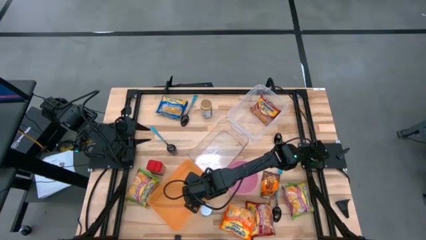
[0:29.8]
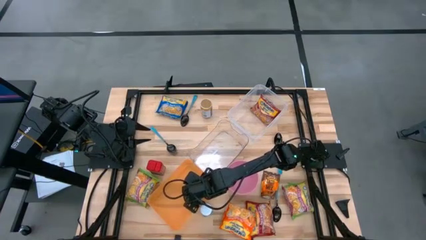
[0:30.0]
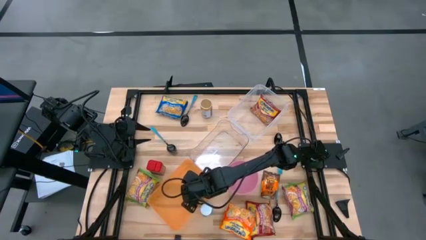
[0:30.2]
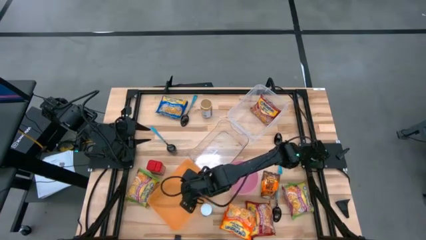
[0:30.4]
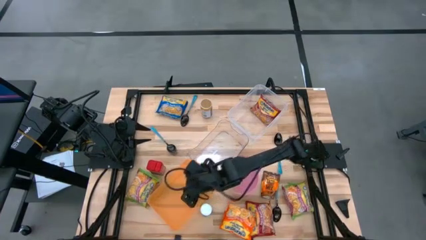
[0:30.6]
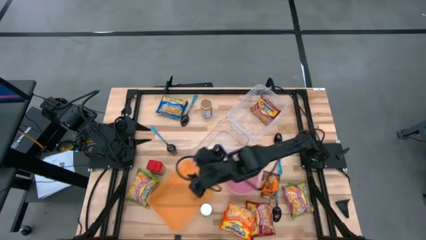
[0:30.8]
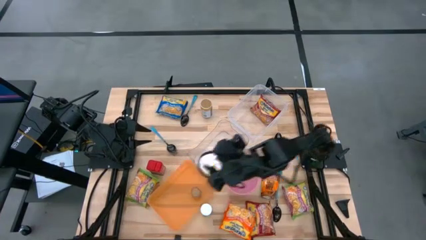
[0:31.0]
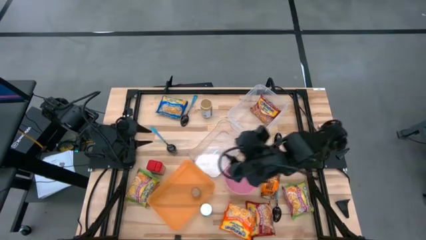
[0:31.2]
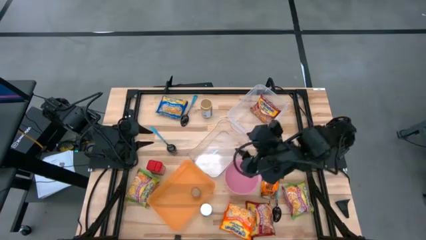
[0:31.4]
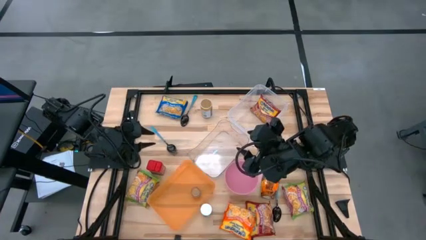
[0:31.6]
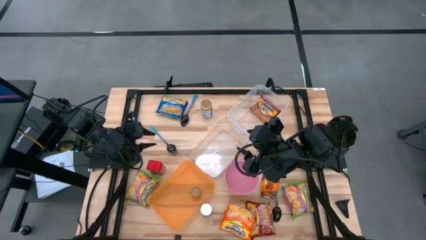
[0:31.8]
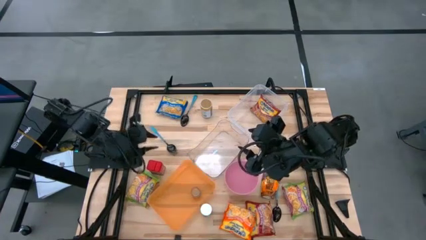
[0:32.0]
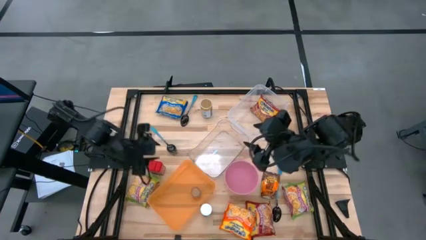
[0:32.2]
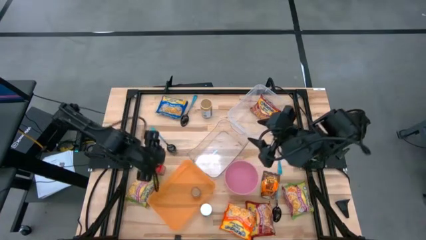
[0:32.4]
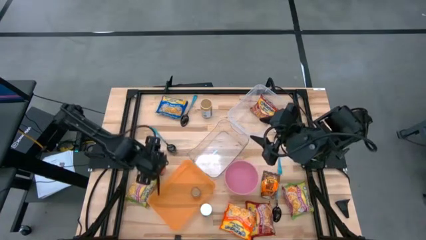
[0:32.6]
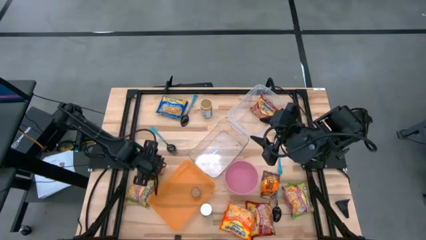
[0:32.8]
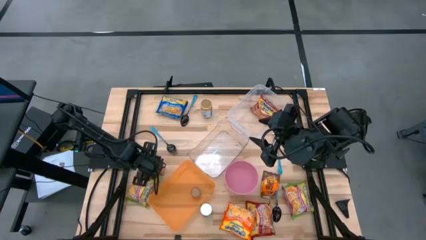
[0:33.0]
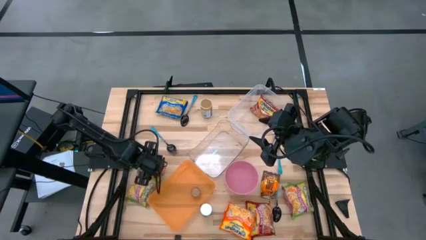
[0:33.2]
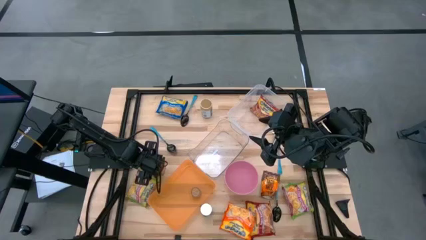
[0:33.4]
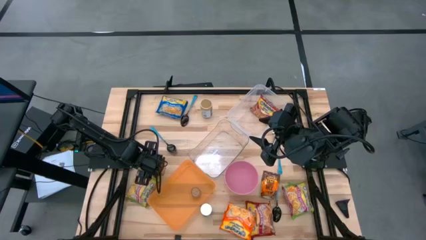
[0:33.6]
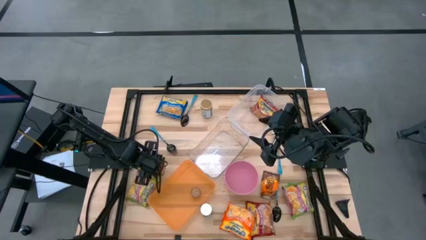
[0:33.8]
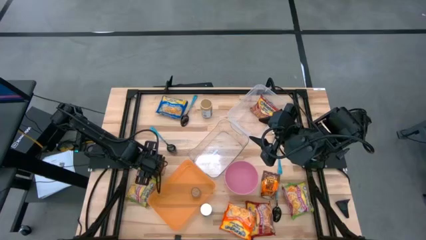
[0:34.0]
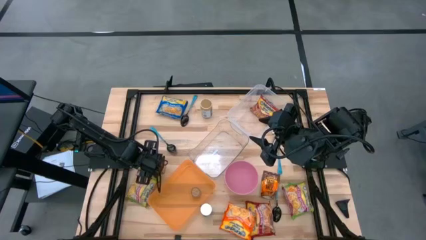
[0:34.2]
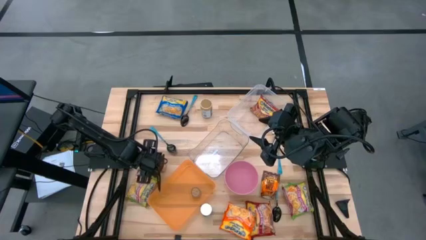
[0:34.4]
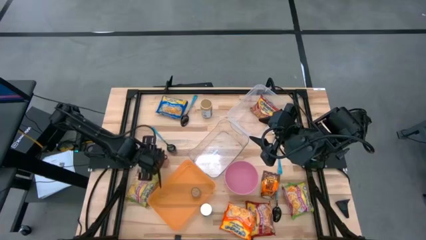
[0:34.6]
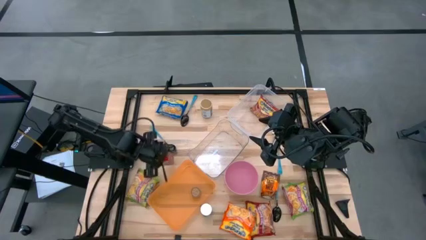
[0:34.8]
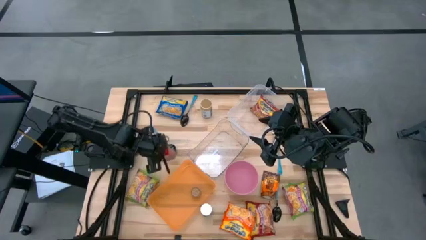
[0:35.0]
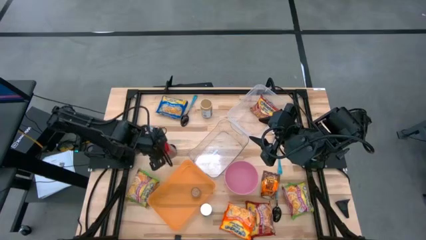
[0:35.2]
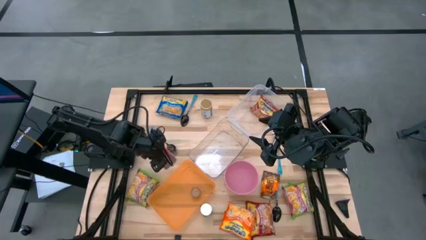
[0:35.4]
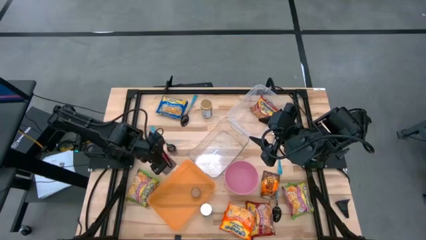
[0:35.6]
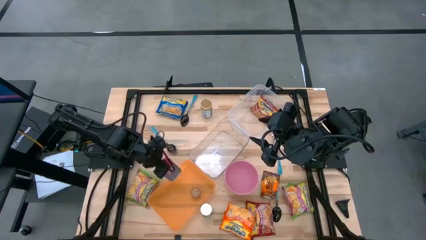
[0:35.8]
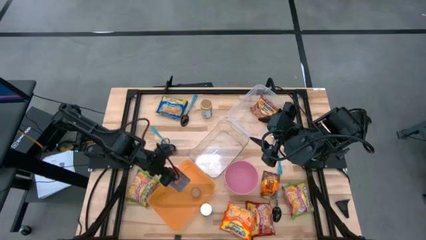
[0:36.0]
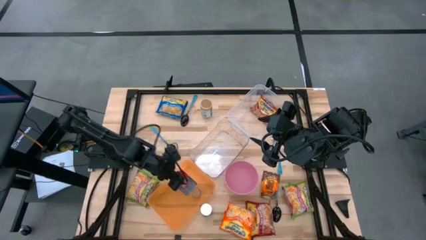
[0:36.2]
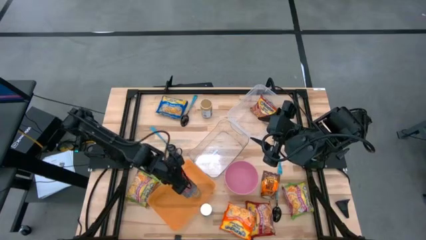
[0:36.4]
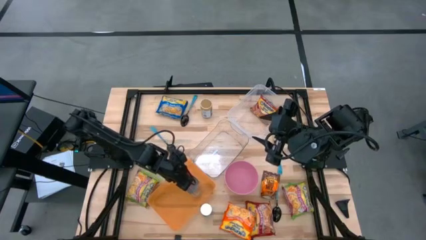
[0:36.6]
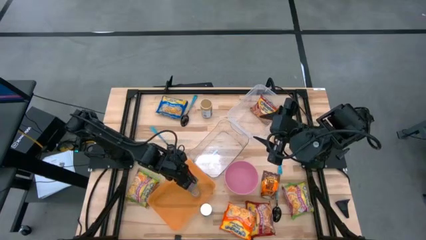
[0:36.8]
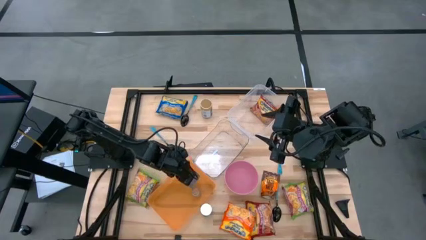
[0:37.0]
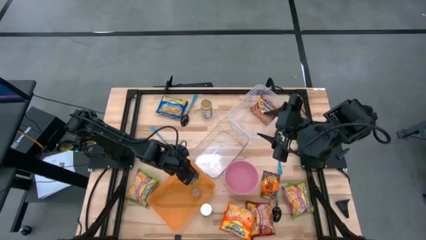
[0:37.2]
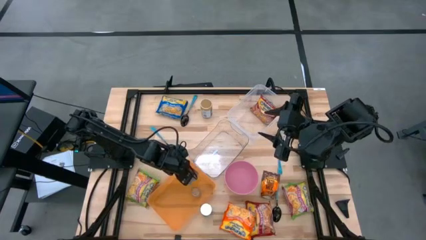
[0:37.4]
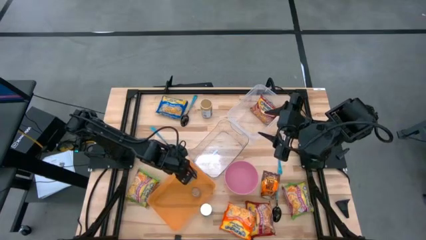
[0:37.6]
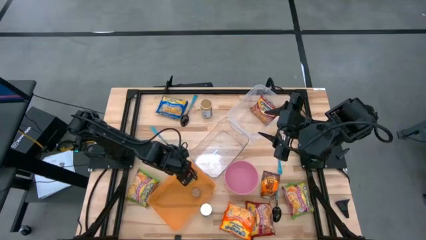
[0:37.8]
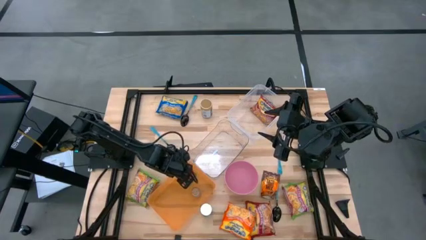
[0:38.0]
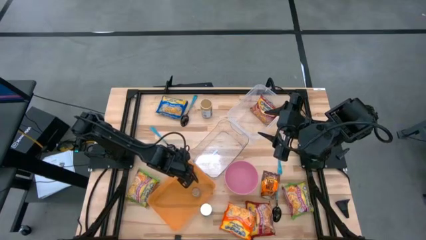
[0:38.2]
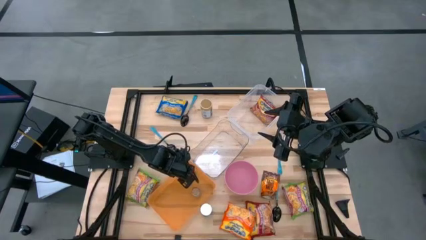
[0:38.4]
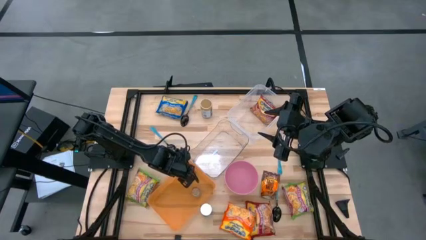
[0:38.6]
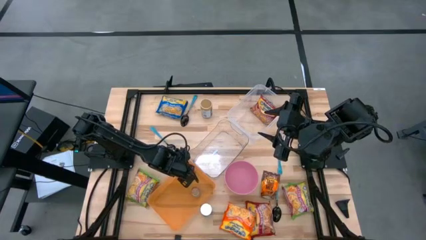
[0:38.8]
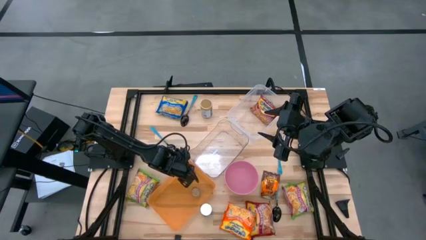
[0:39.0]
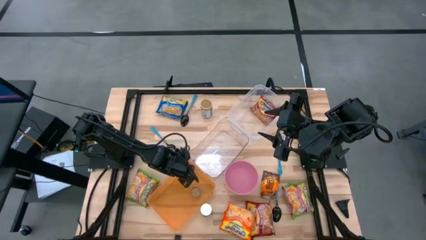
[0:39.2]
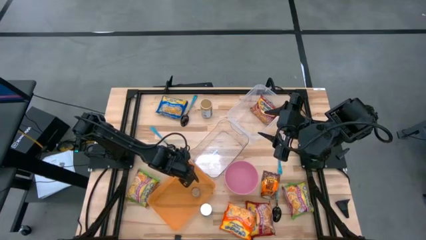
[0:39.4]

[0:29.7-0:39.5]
Task: Pick & Place Food Item
Put the red seasoning can into the orange bin
